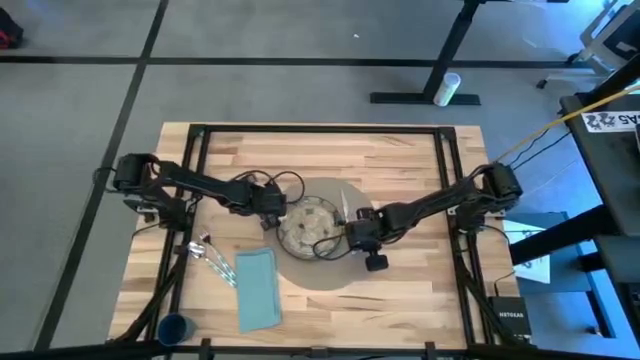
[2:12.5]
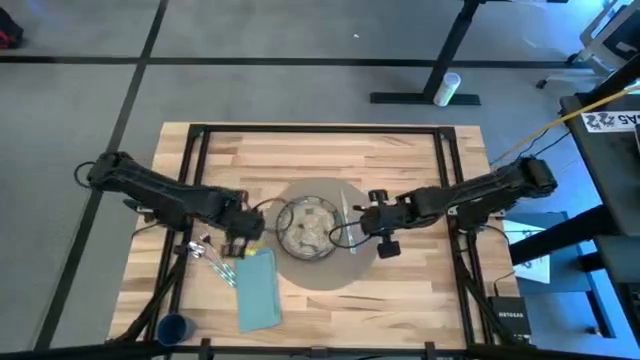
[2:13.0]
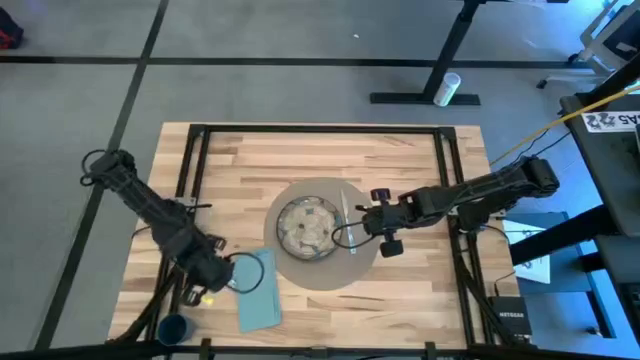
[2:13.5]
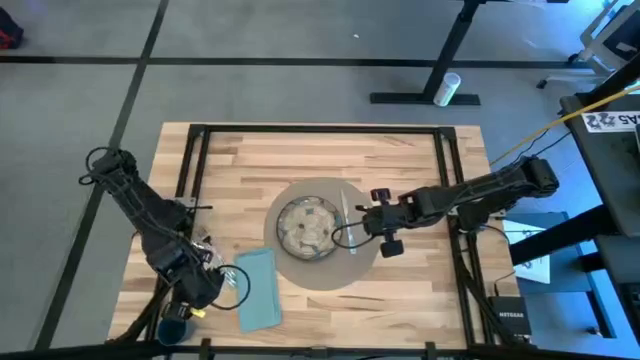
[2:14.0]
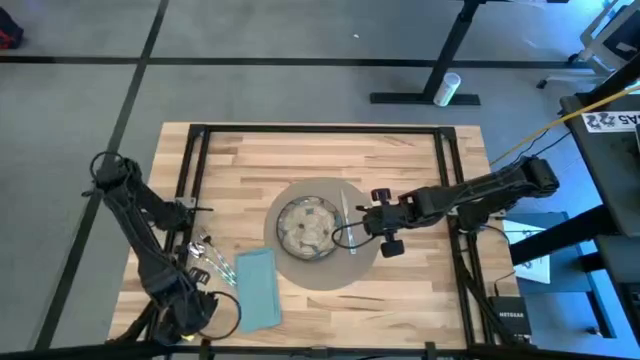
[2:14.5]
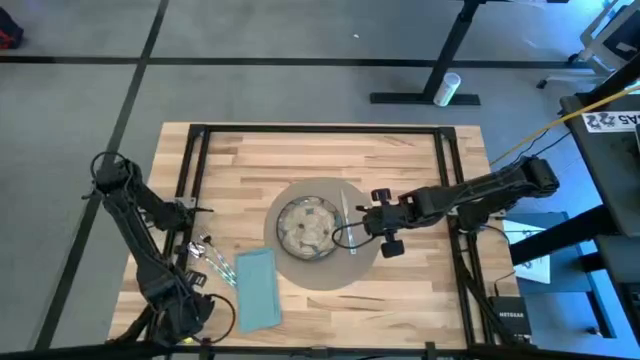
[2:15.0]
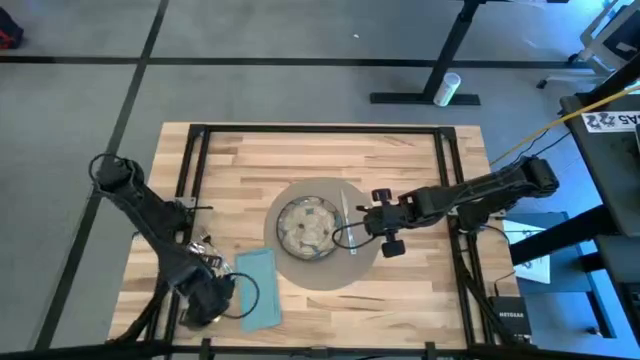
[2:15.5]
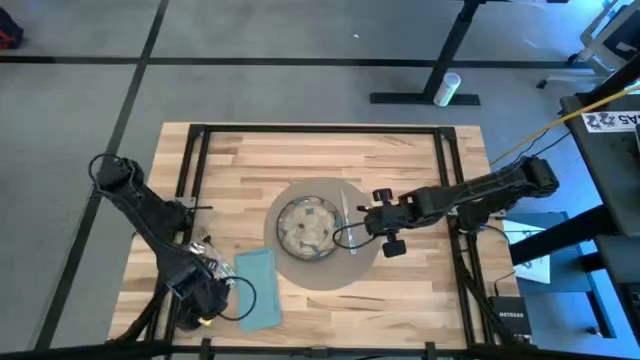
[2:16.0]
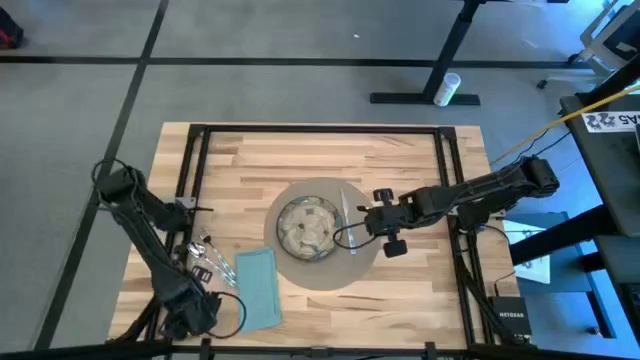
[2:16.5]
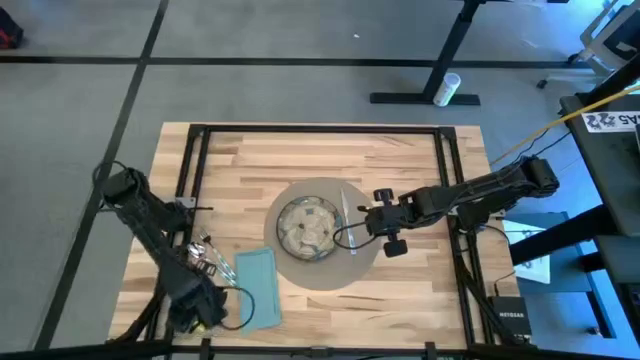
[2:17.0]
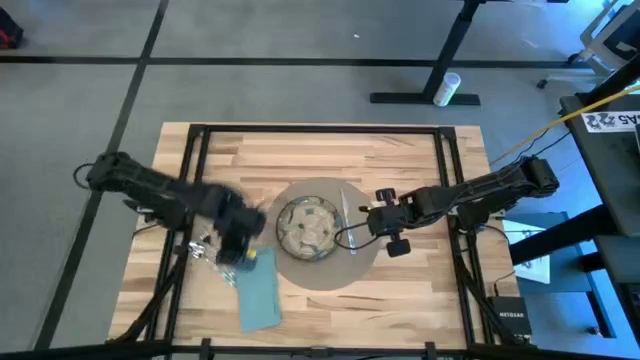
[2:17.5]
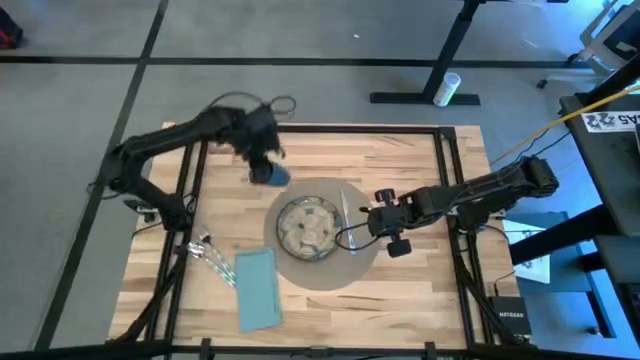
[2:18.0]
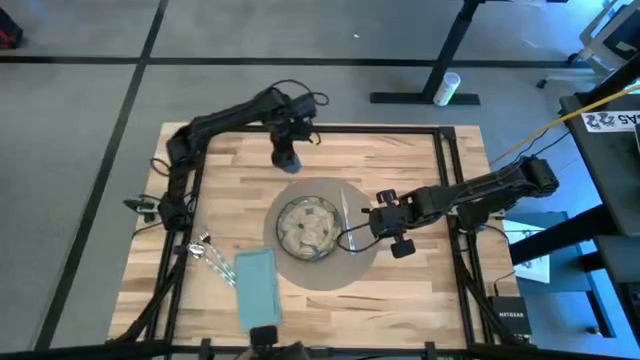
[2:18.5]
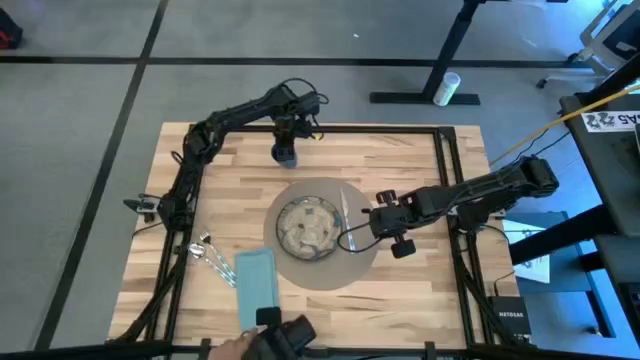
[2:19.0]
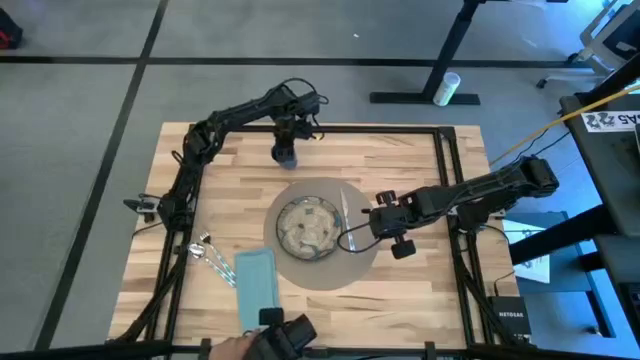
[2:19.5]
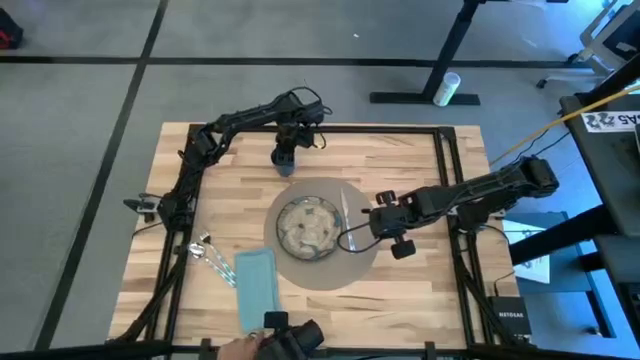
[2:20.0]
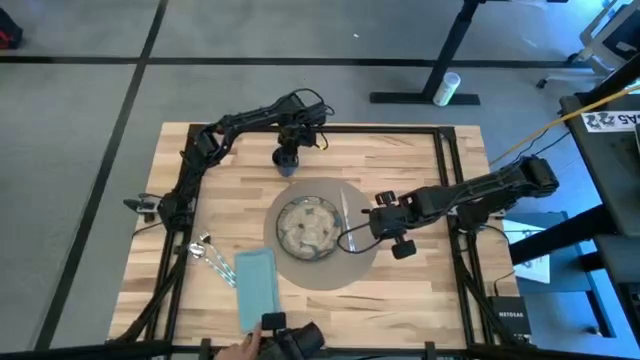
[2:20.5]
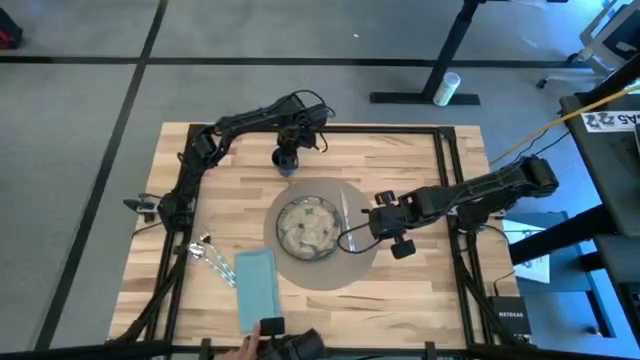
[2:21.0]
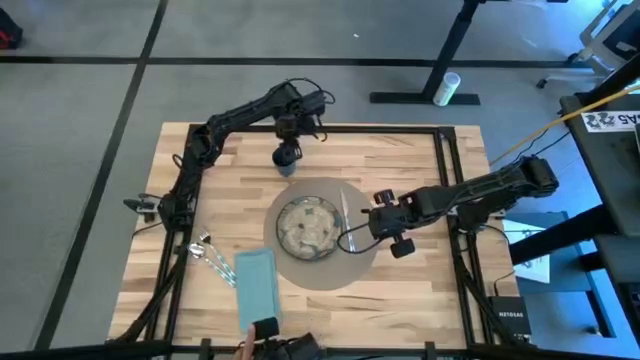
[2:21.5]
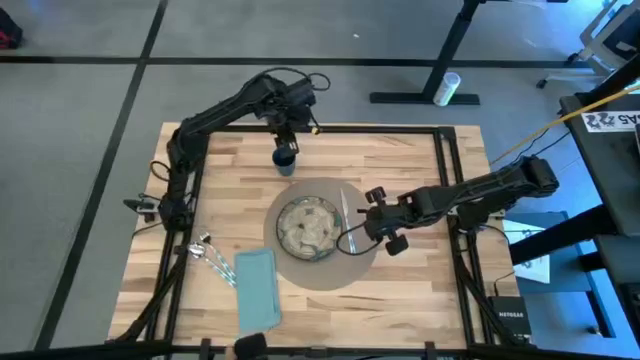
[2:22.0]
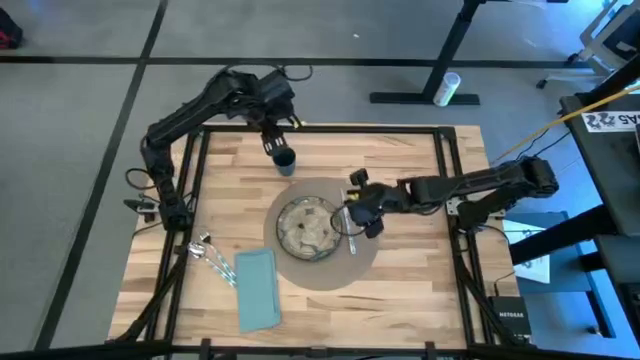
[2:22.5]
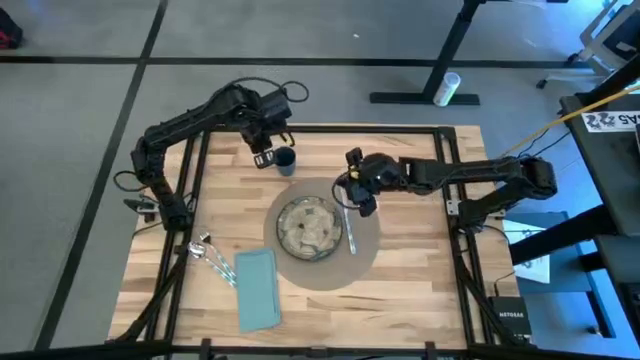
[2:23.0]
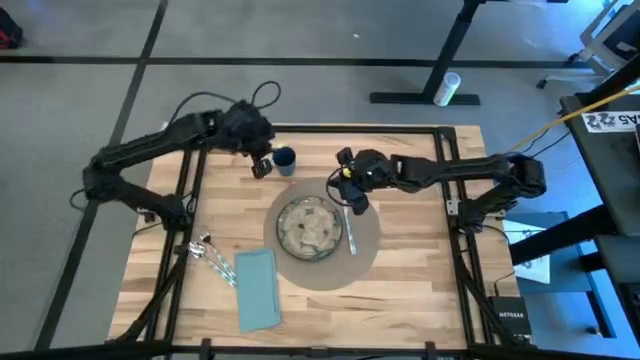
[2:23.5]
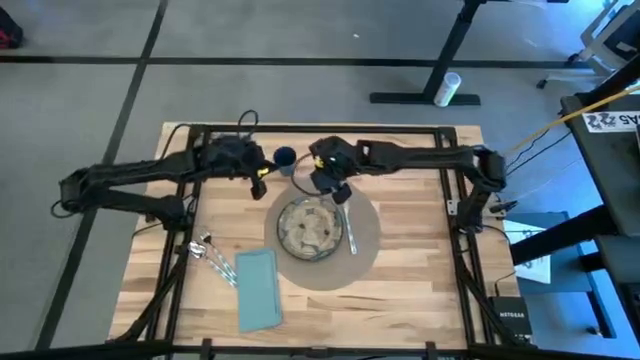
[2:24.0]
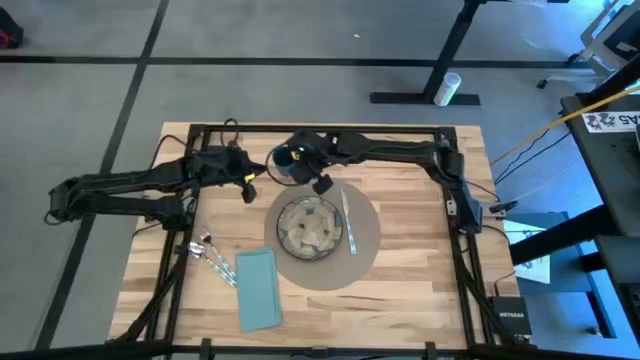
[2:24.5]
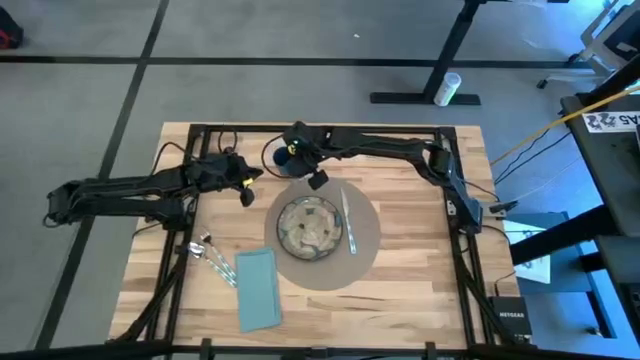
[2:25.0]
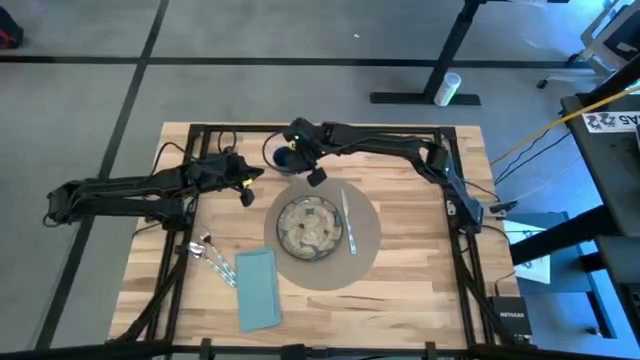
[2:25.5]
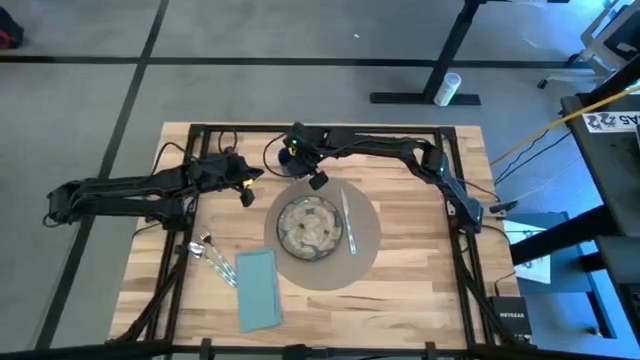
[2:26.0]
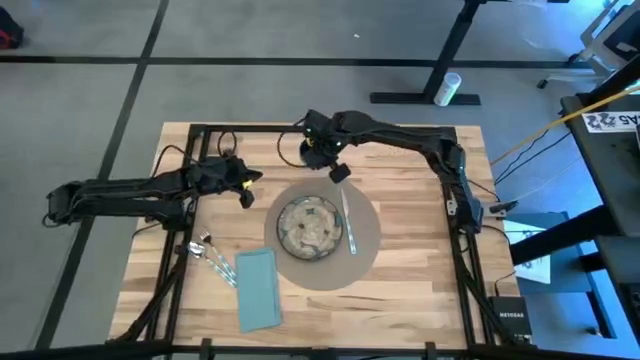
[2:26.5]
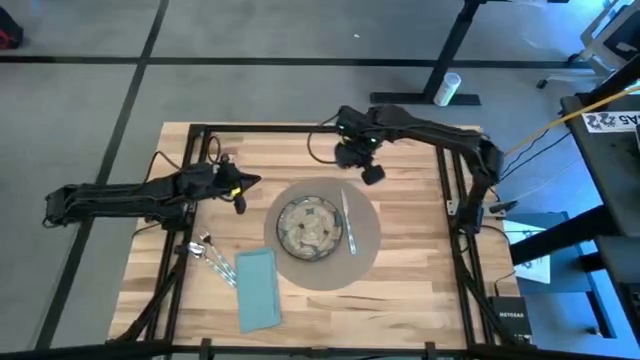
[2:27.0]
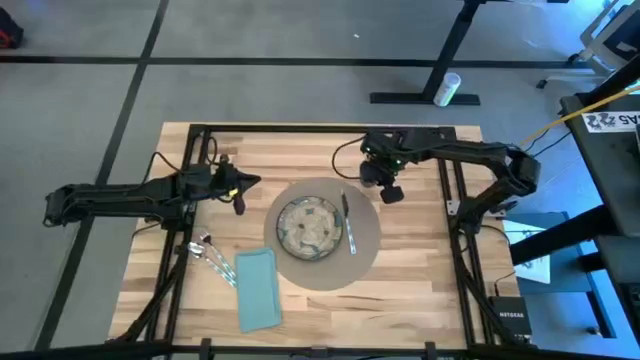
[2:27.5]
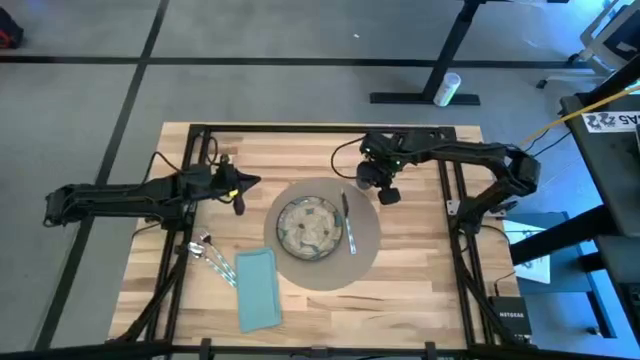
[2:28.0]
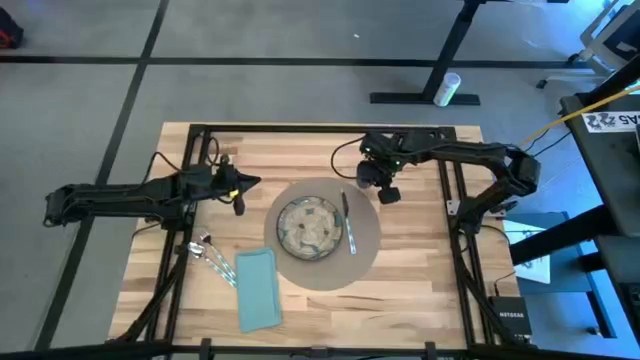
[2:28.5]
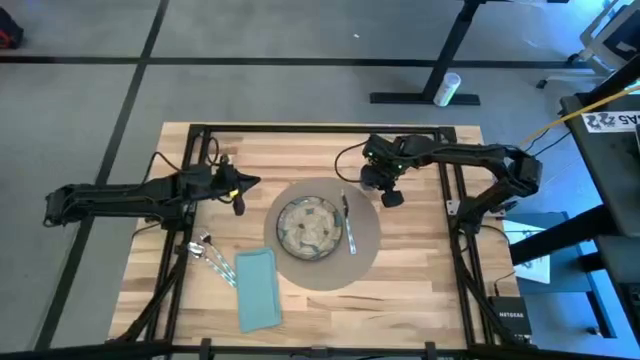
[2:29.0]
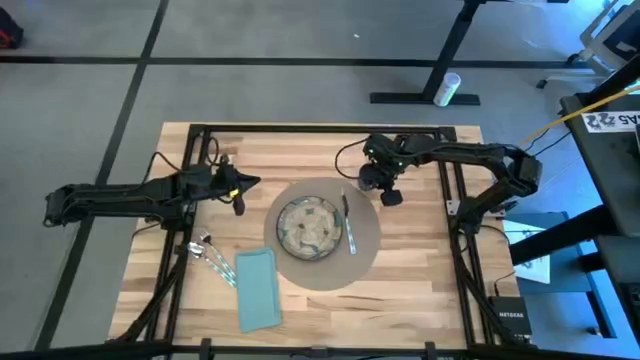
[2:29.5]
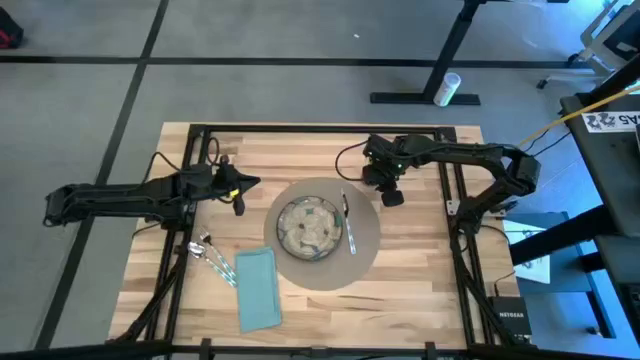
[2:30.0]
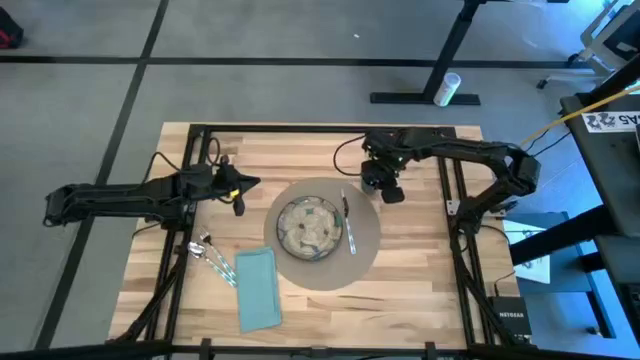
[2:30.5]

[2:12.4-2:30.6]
Task: Set table place
Move the blue cup to the top right of the brown tablemat

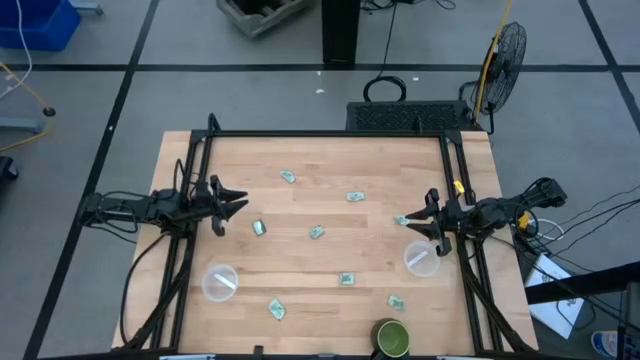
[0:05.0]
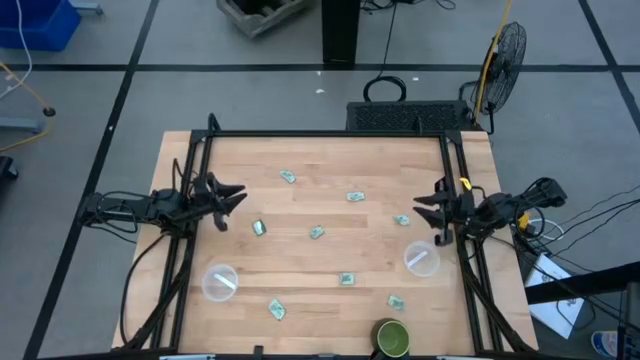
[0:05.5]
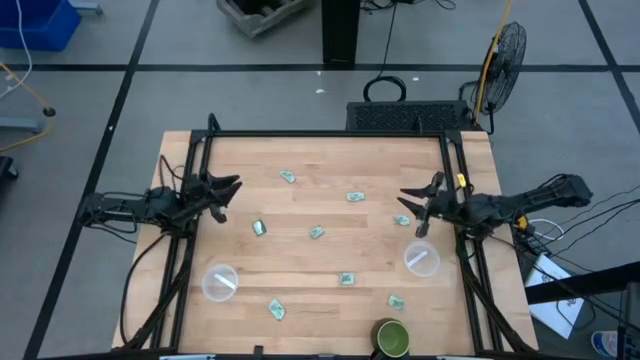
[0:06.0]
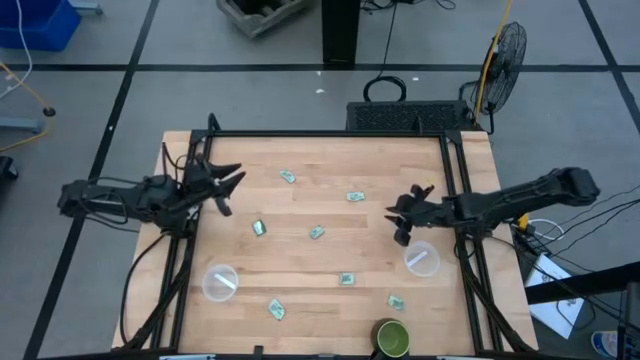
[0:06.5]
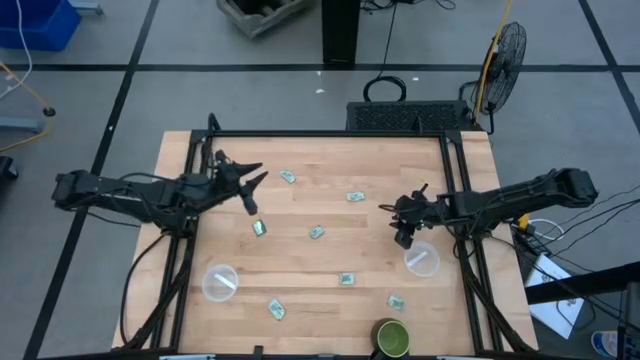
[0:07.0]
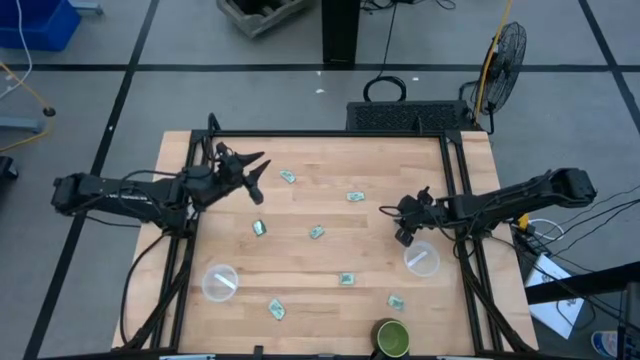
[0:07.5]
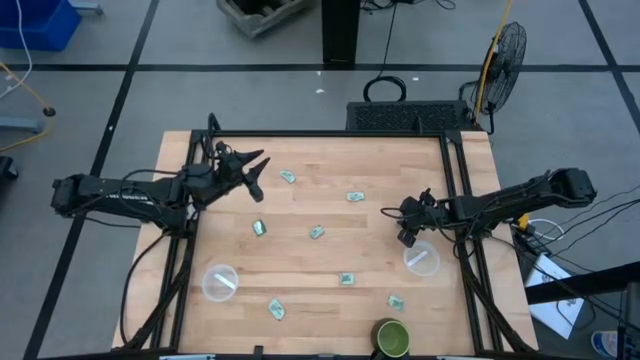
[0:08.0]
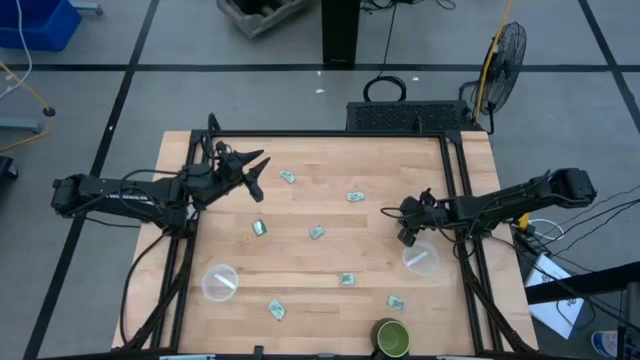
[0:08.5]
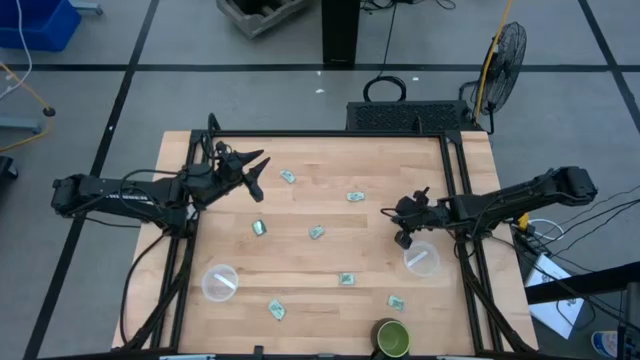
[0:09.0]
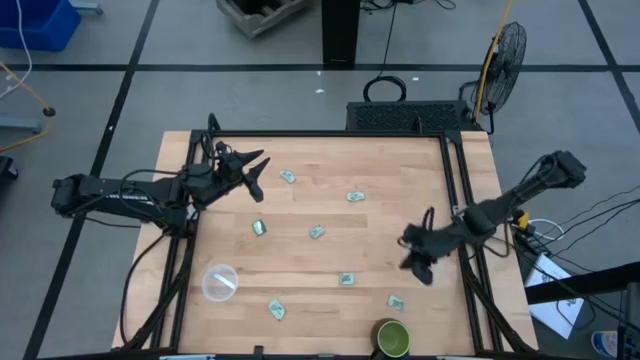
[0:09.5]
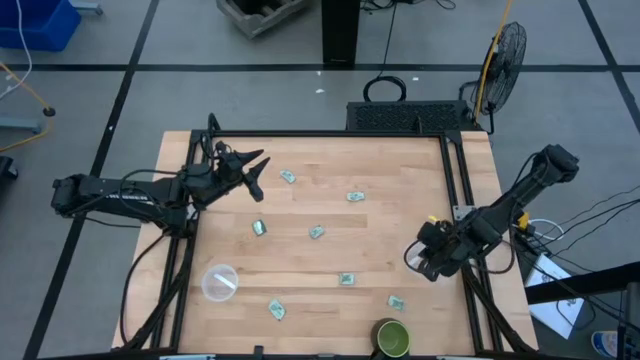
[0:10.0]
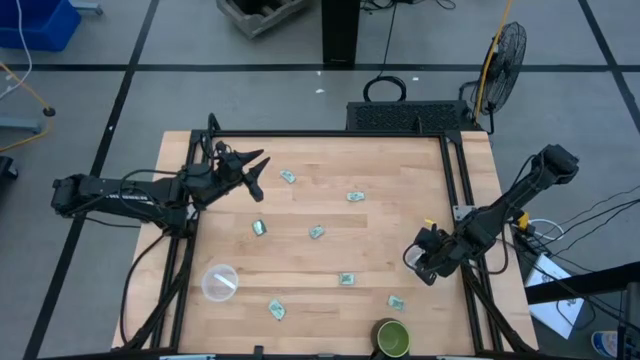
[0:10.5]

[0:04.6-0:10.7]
Task: Pick and place Stevia / Truvia into bins
Put the Stevia packet into the right transparent plastic container
